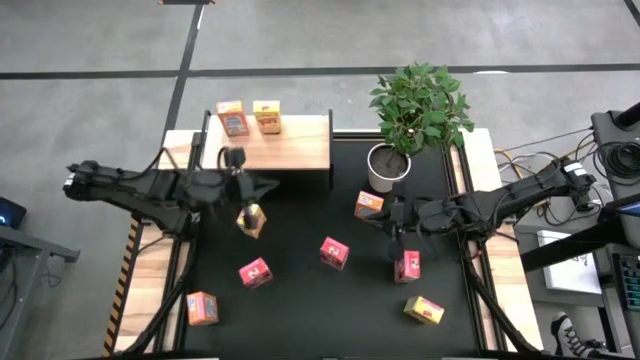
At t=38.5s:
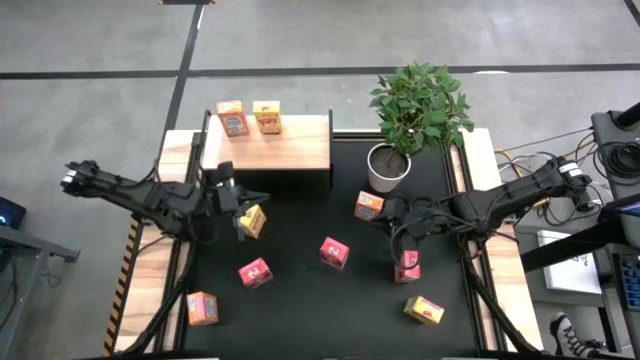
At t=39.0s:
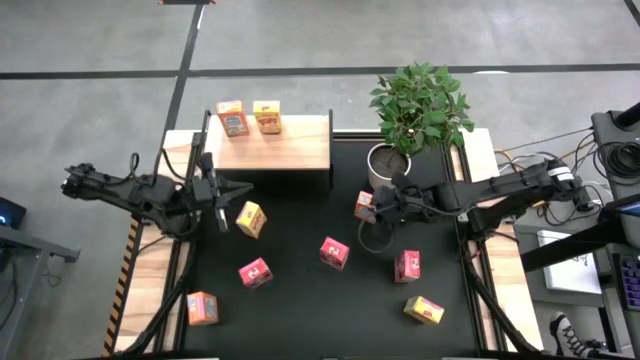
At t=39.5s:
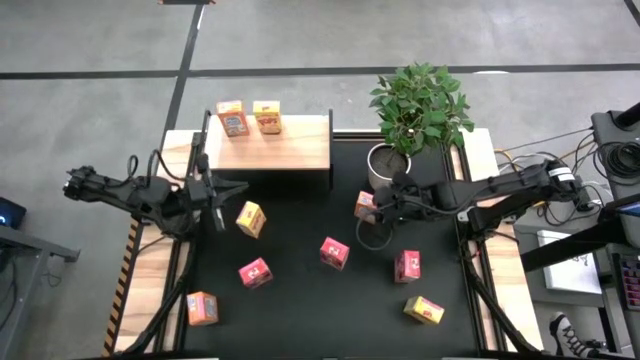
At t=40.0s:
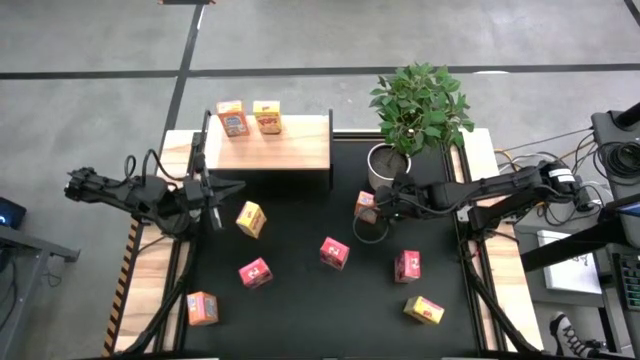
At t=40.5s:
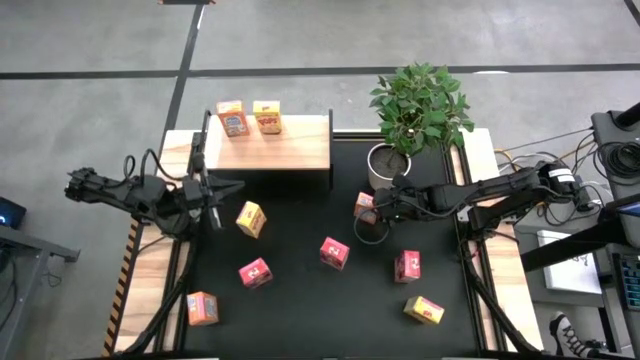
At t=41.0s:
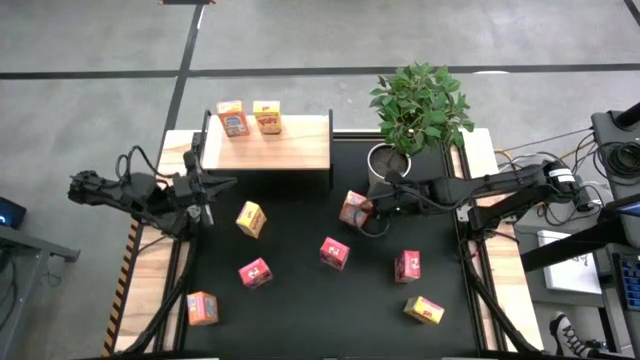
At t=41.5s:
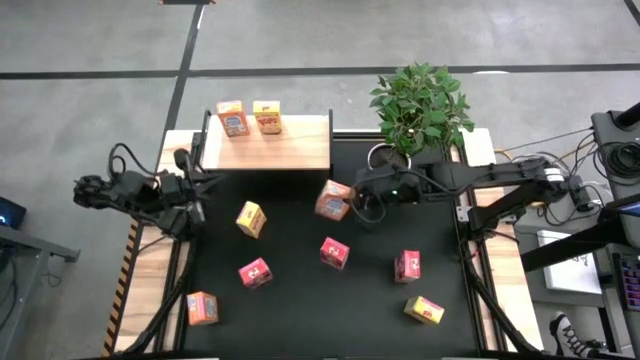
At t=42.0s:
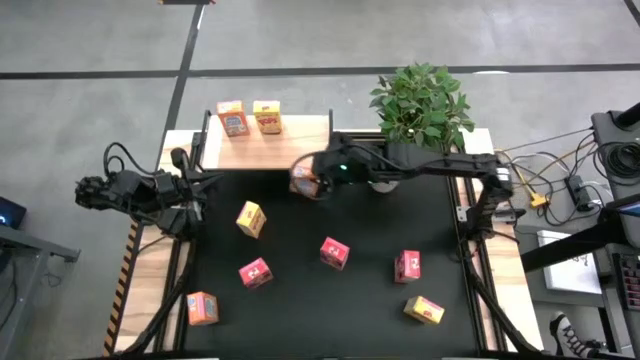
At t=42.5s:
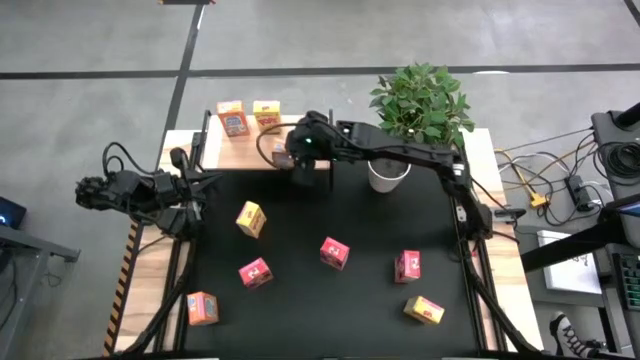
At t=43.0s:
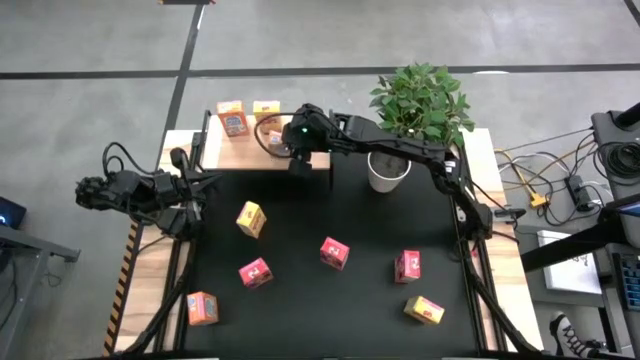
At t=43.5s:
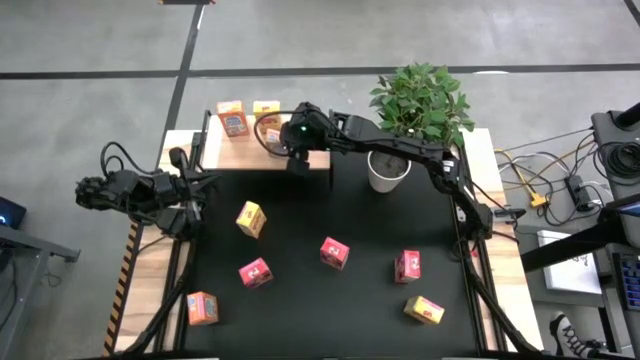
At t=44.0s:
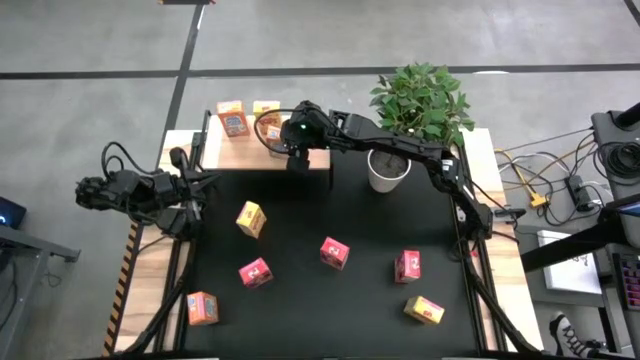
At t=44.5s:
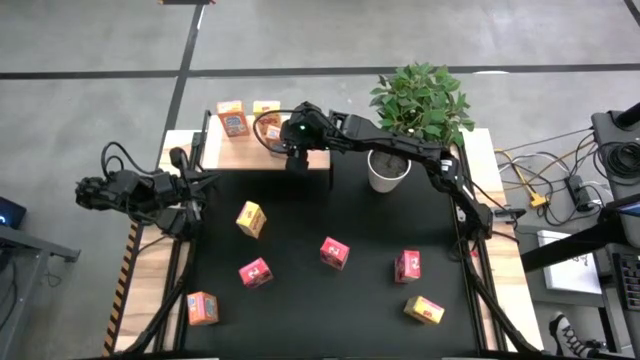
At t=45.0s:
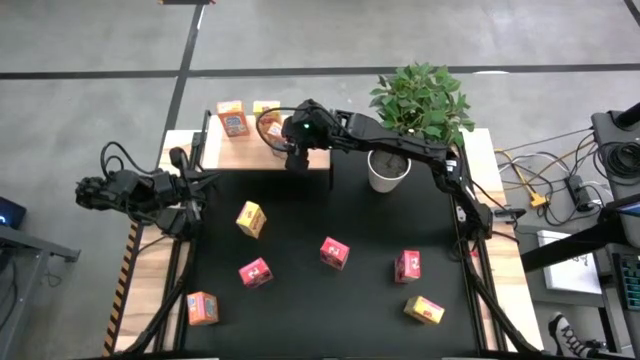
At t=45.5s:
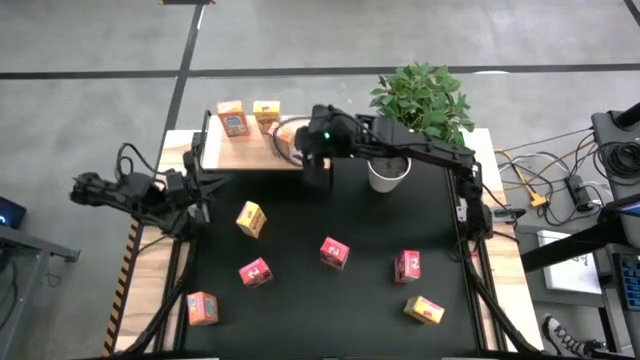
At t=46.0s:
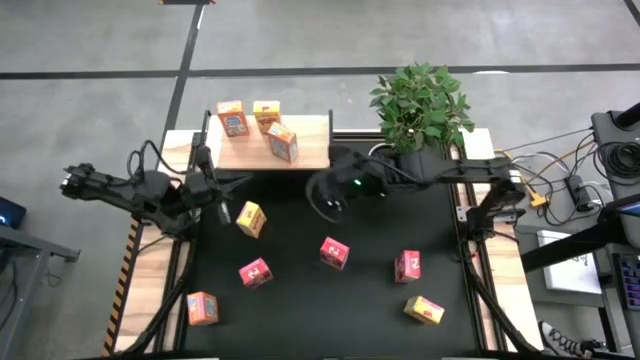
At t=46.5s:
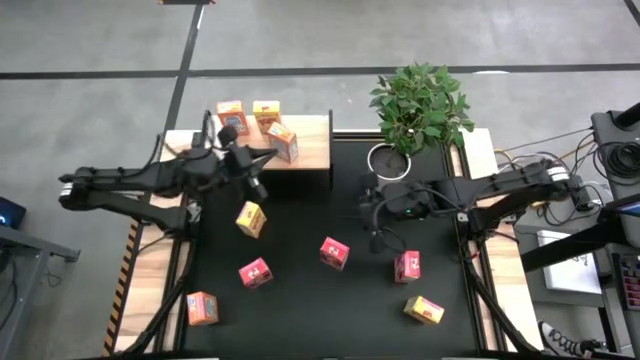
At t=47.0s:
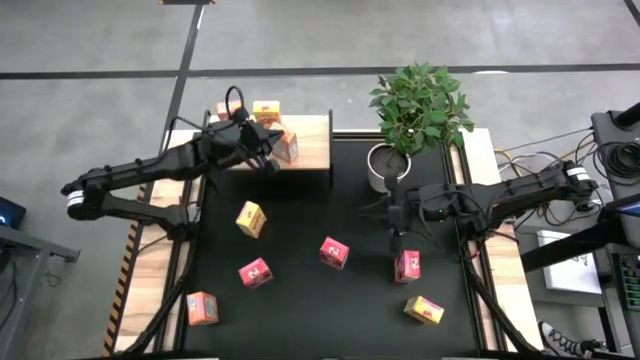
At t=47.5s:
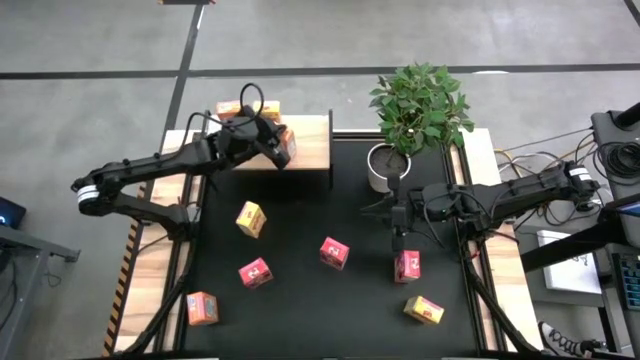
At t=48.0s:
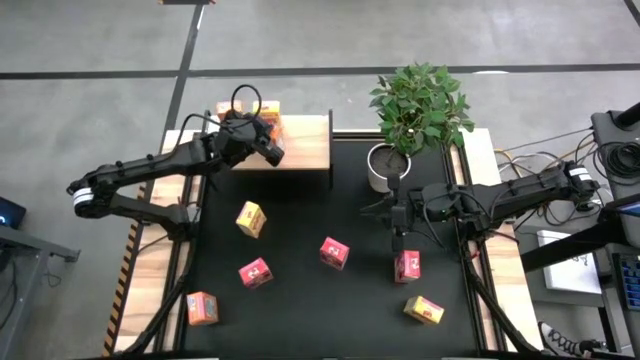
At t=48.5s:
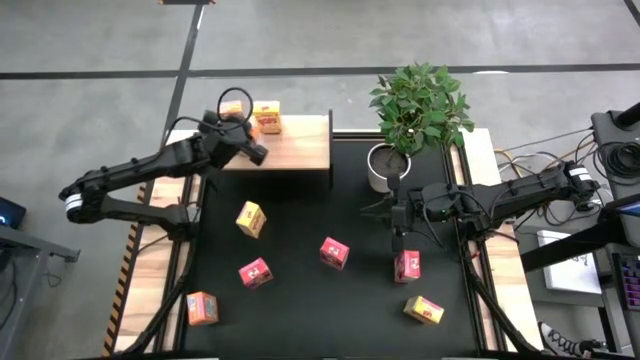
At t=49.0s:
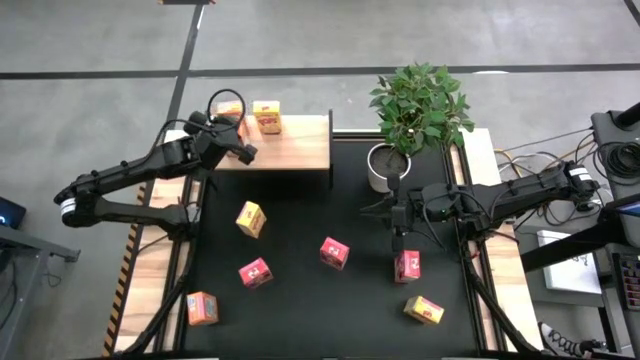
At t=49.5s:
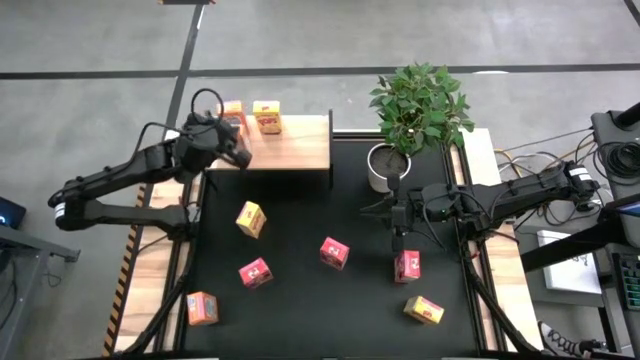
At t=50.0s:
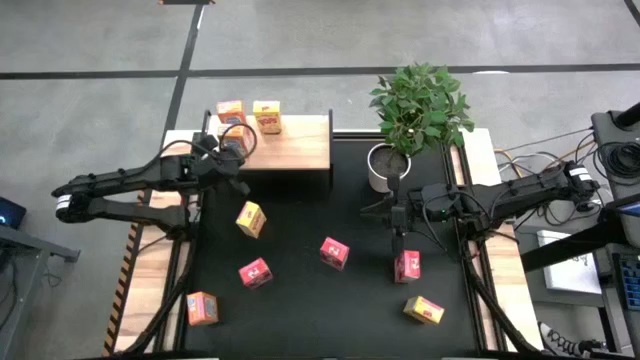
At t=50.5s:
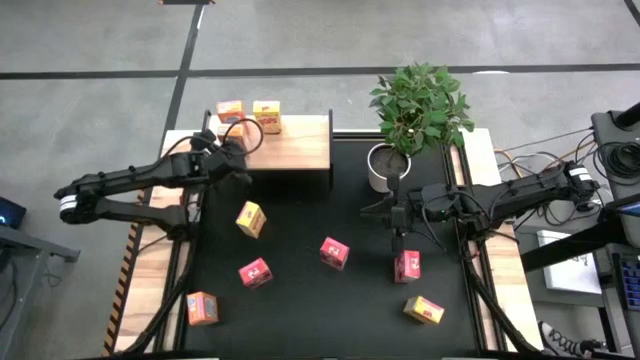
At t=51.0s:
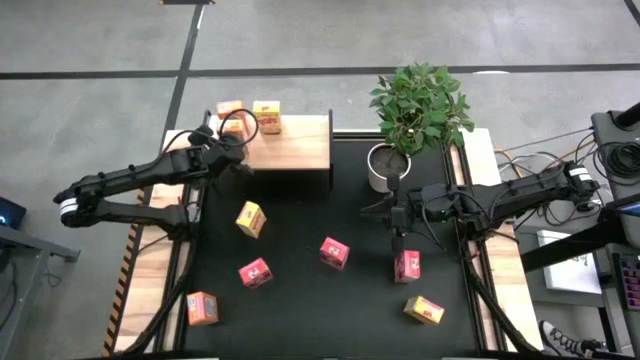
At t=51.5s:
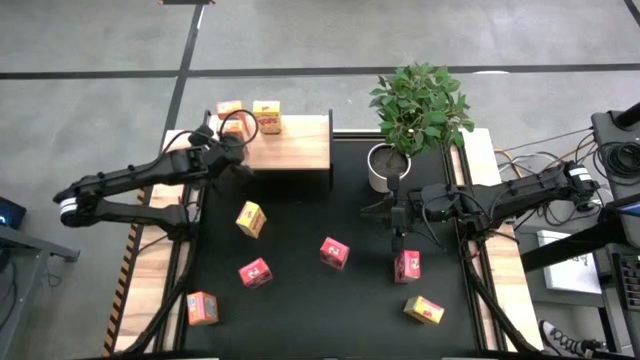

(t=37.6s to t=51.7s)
Task: Stack cereal on shelf
Put the top orange cereal box on the shelf

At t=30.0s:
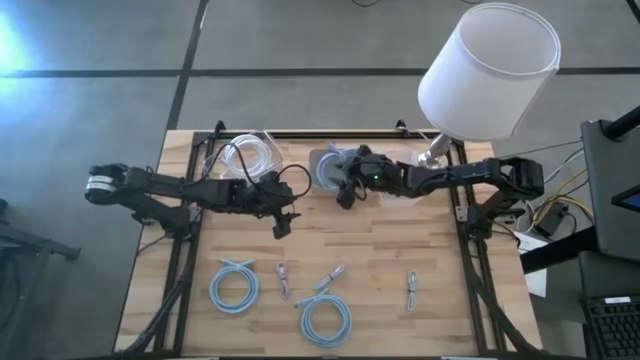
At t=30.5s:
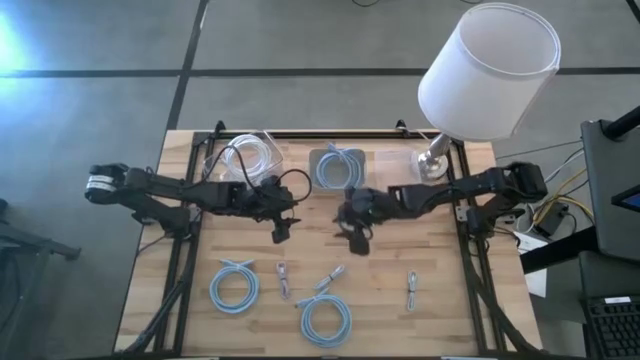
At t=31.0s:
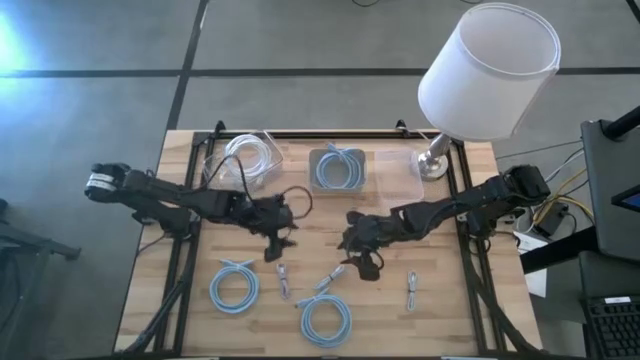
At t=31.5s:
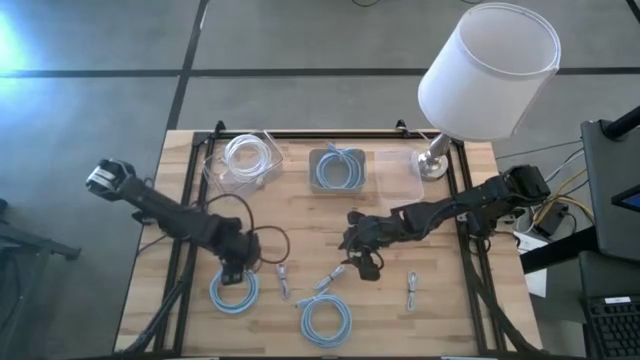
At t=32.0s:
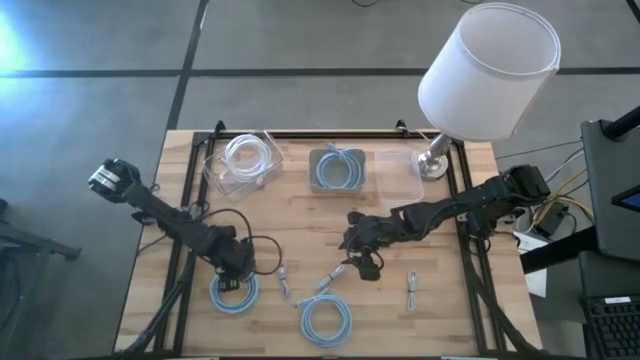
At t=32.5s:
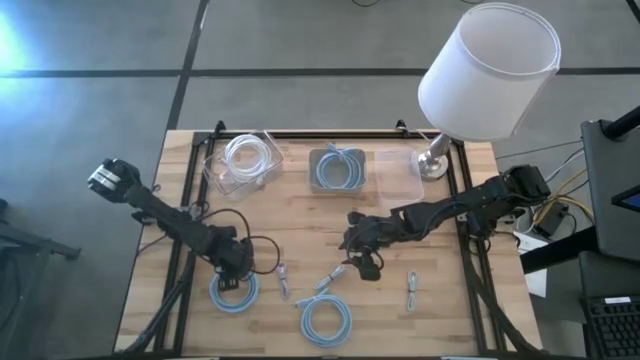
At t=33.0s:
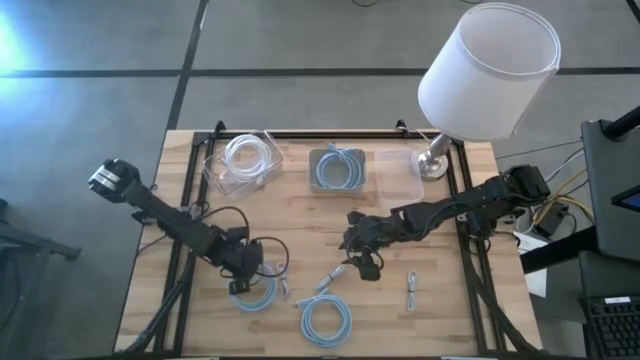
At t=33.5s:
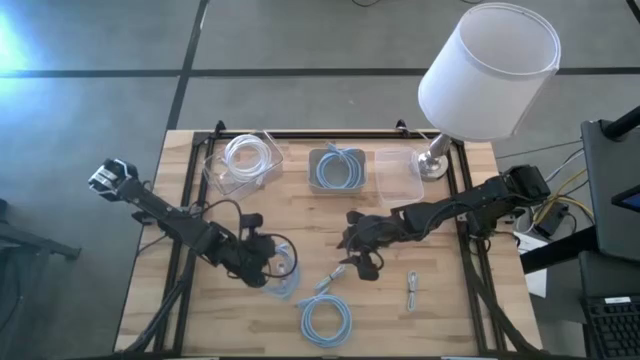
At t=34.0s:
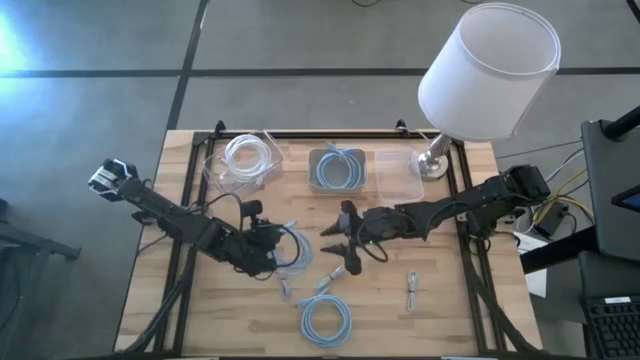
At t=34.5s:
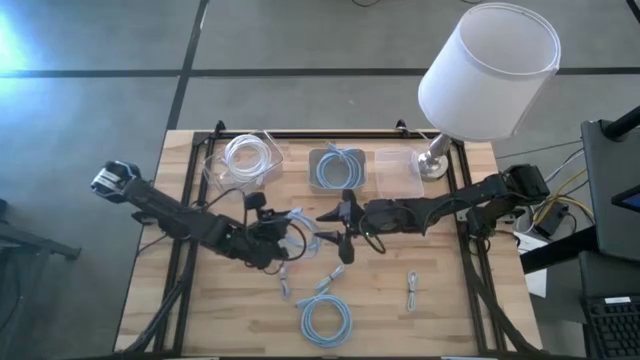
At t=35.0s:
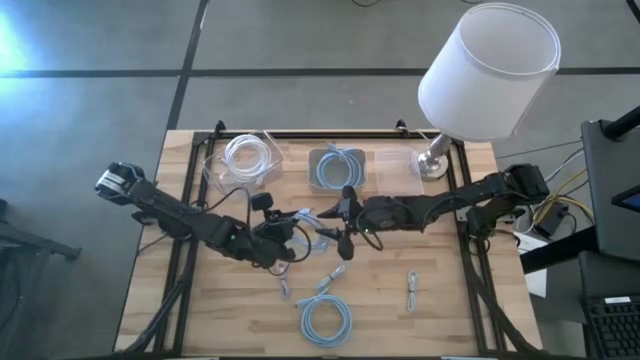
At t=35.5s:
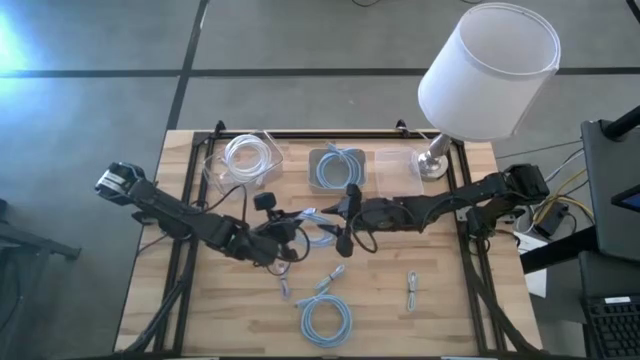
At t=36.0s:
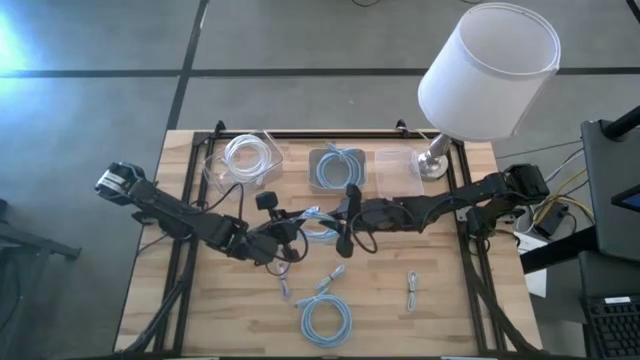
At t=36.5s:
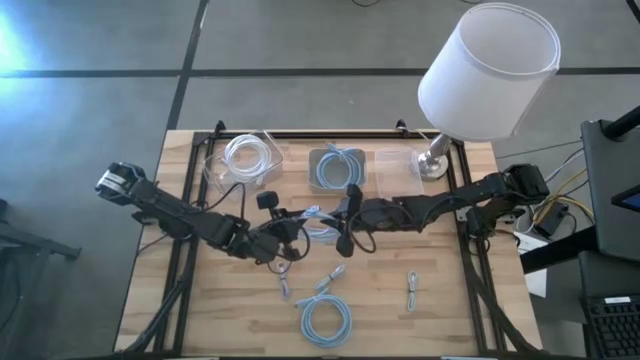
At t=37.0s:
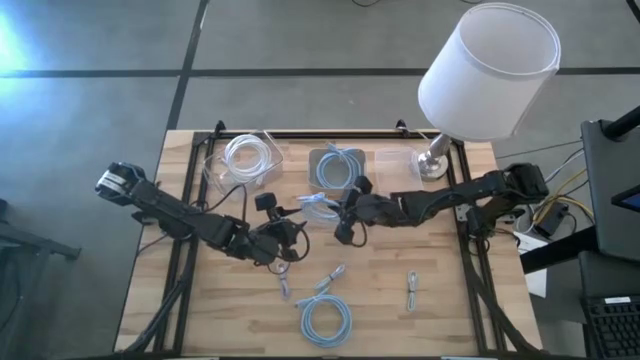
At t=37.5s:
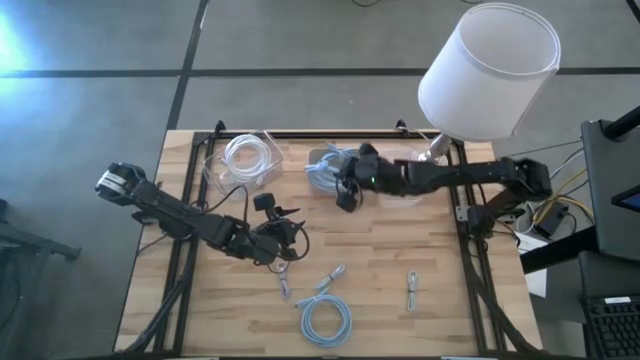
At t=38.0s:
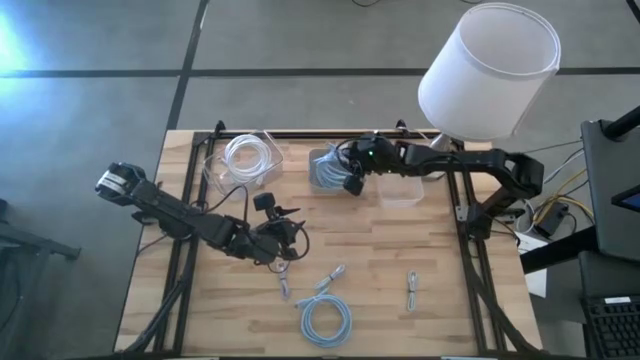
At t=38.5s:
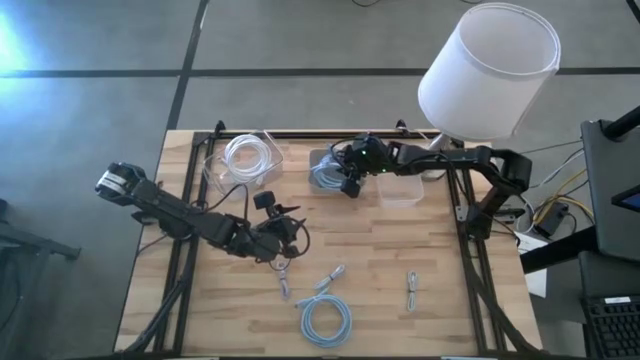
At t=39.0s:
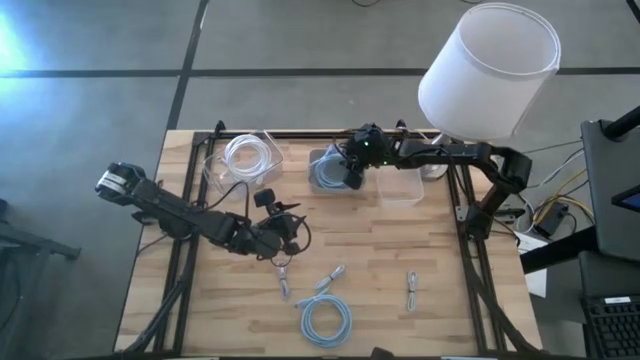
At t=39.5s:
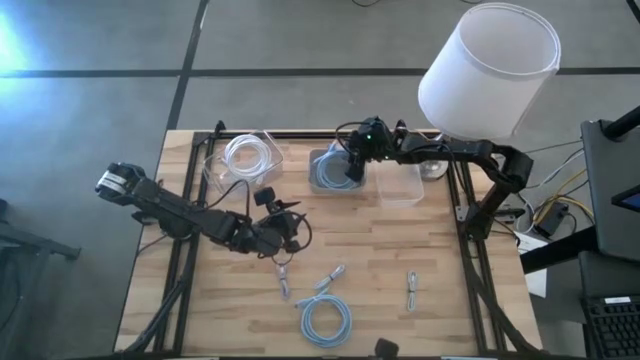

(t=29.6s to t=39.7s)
Task: Pick & Place USB Port
Put the left large blue charger cable into the gray bin
